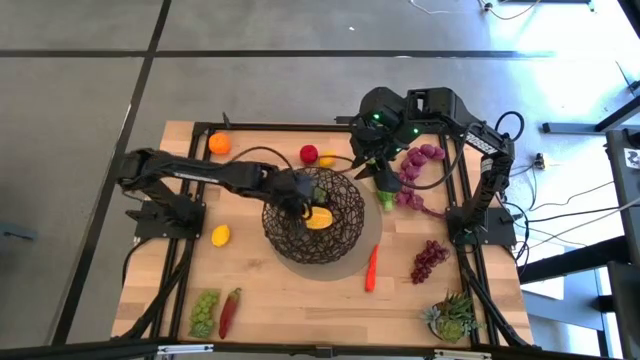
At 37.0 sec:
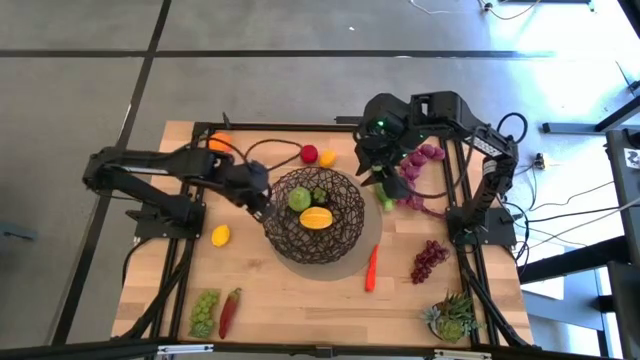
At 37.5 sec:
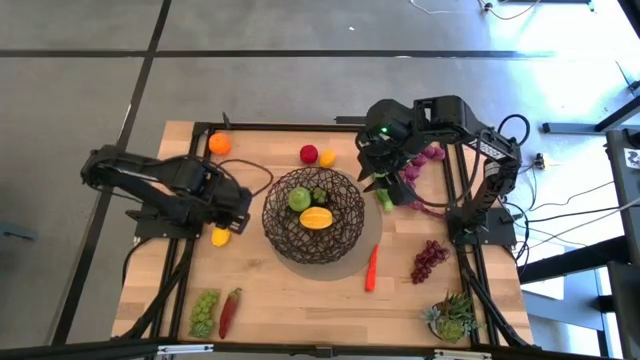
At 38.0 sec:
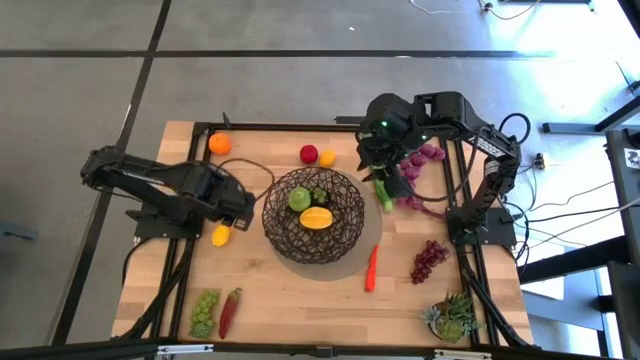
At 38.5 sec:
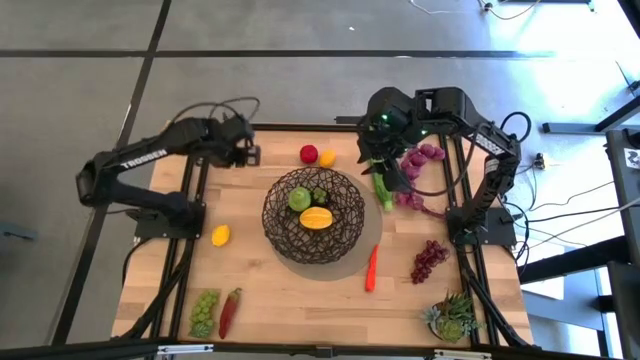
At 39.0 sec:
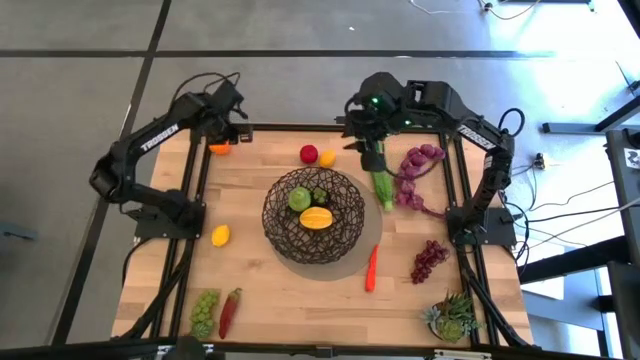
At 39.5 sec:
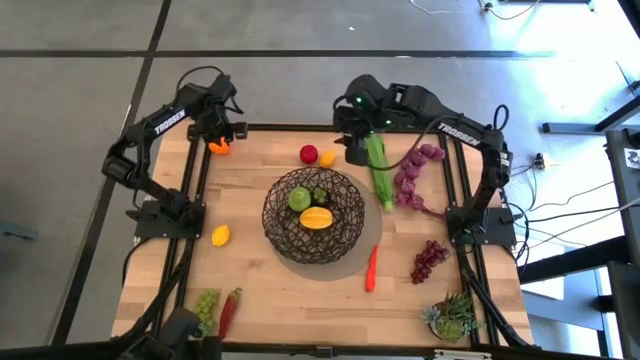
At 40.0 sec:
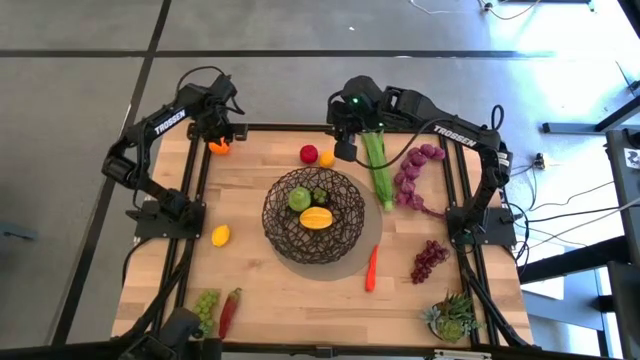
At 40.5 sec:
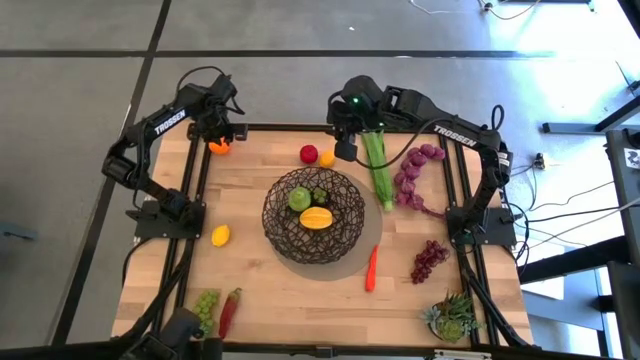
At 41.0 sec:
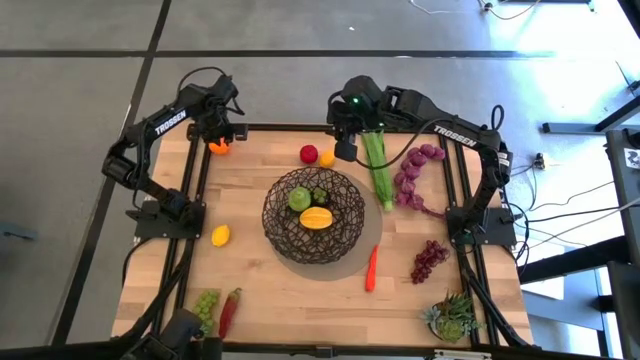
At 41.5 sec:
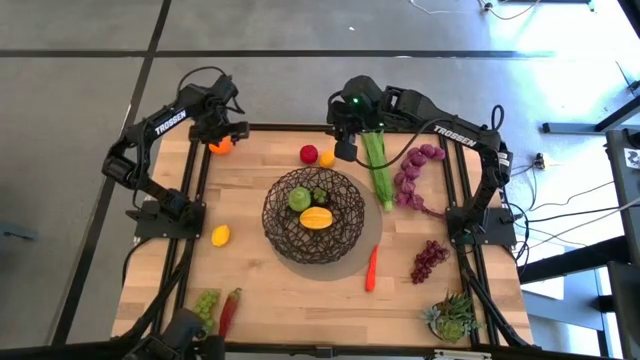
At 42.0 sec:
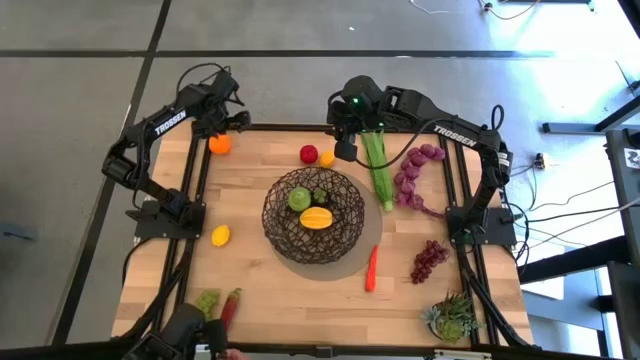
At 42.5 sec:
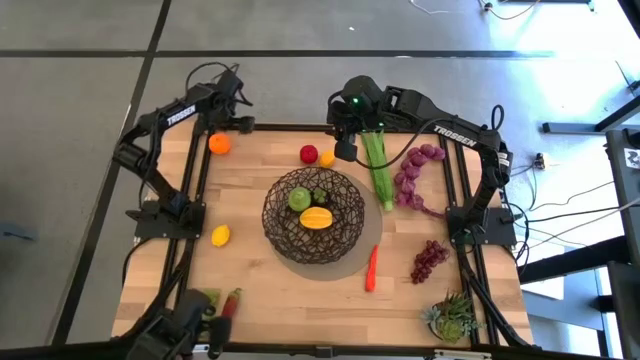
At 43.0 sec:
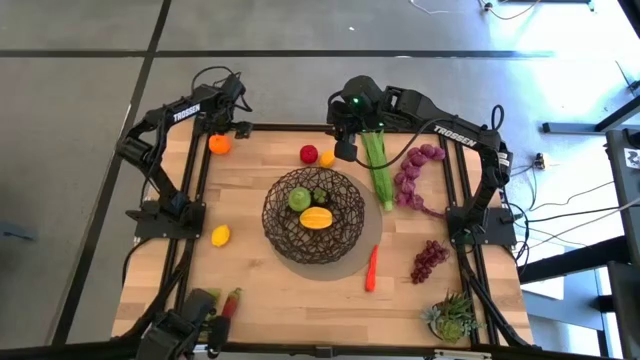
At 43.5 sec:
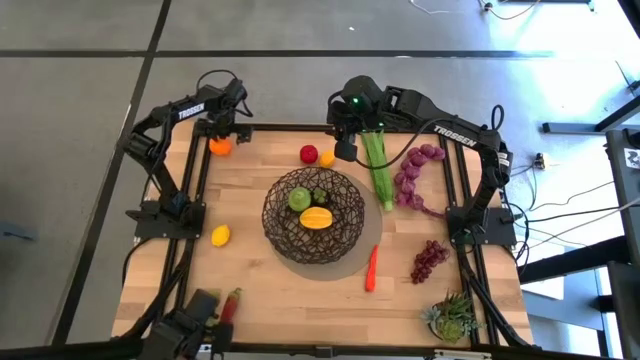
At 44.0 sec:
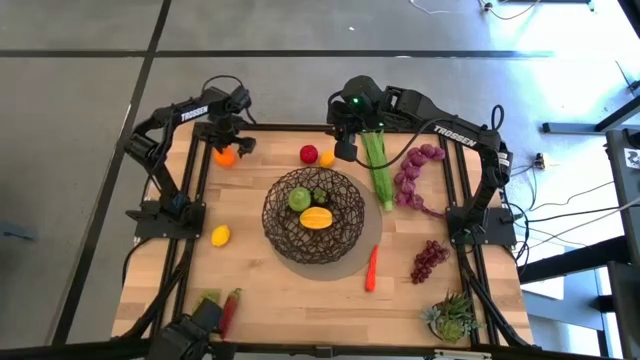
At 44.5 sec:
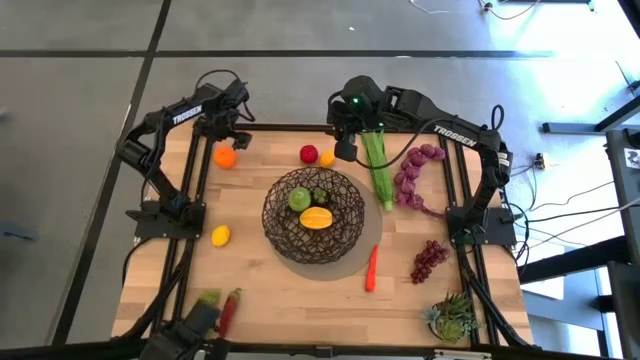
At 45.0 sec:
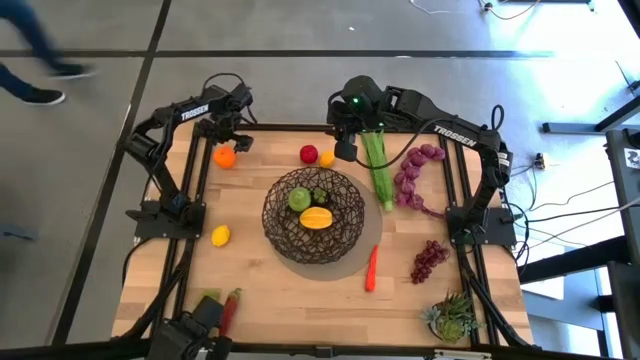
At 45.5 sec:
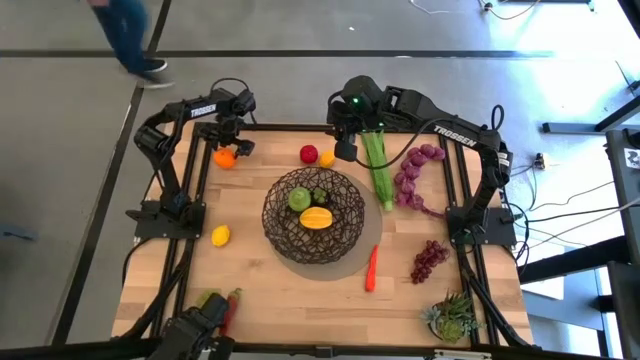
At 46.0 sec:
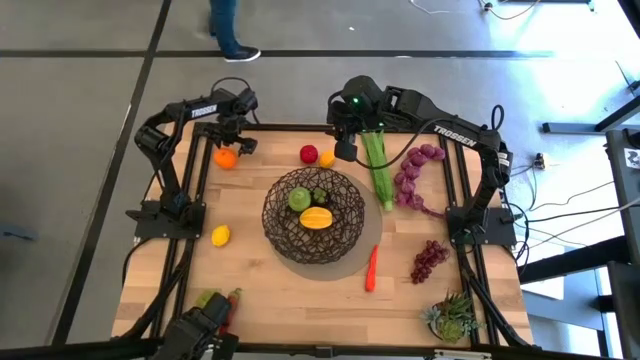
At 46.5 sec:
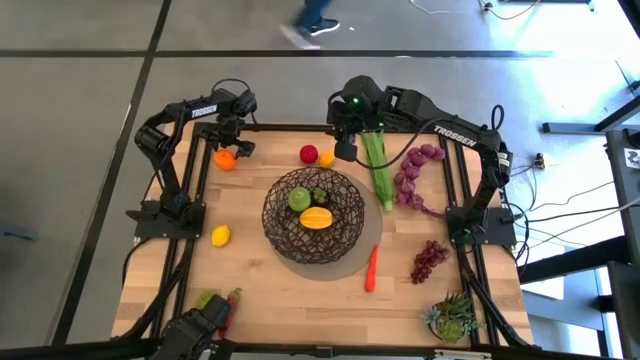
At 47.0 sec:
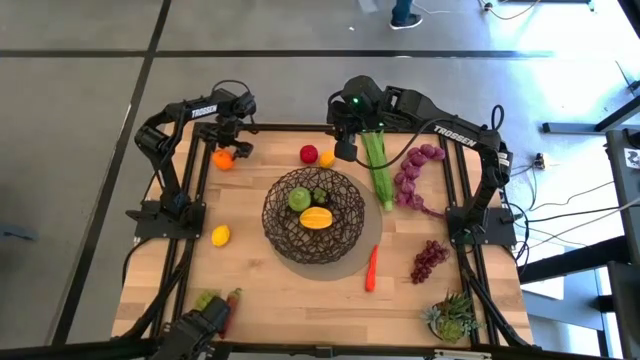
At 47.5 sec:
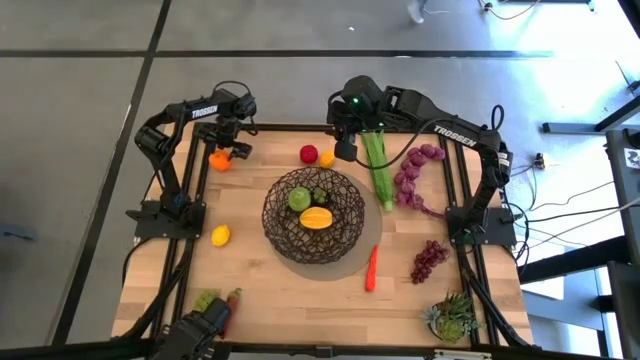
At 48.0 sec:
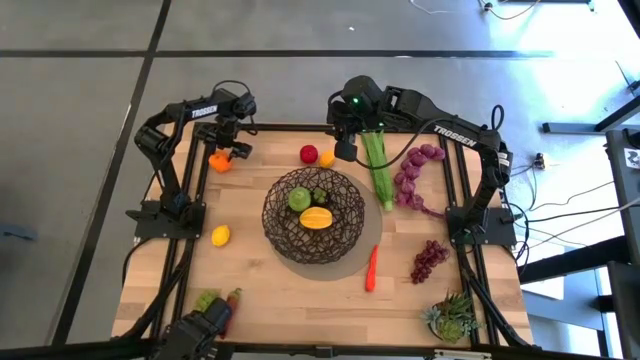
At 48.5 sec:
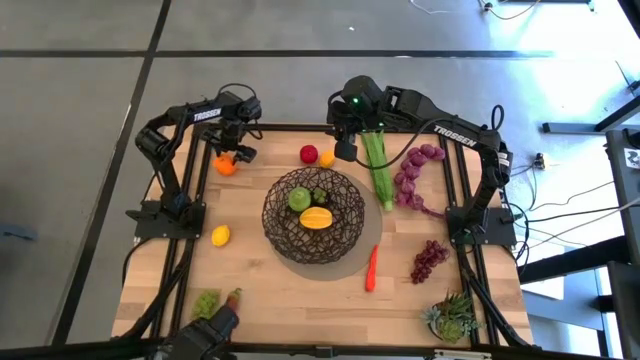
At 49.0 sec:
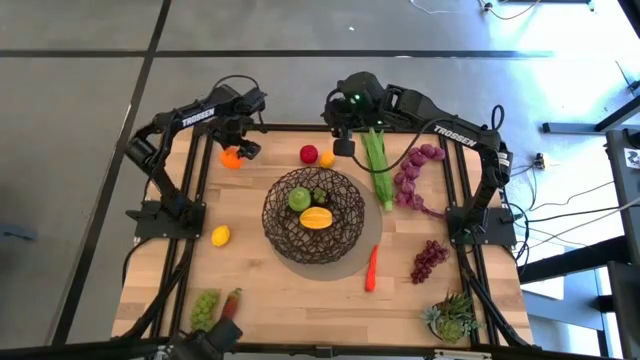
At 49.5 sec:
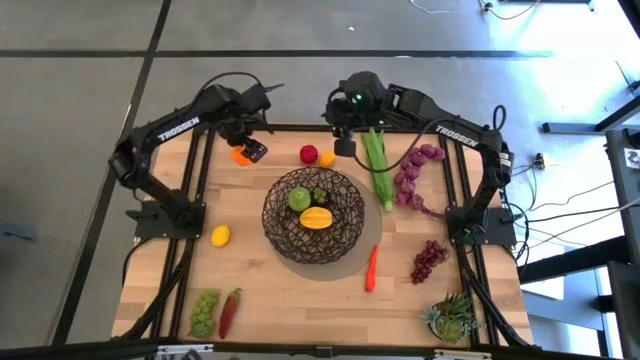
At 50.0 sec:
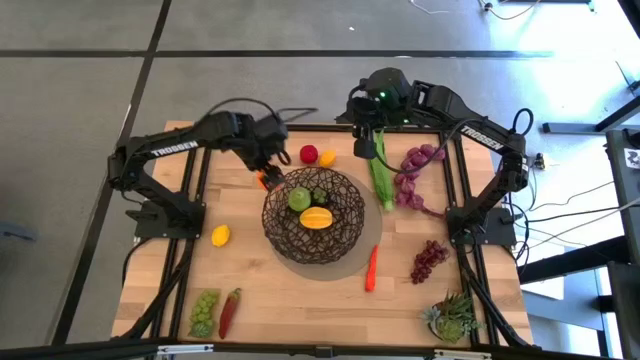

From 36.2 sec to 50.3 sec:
Task: Build produce basket
Put the orange into the wire basket

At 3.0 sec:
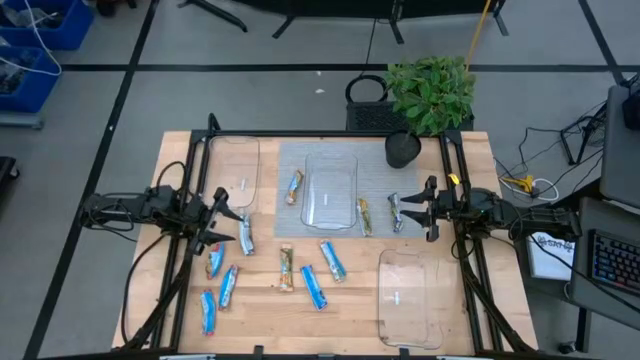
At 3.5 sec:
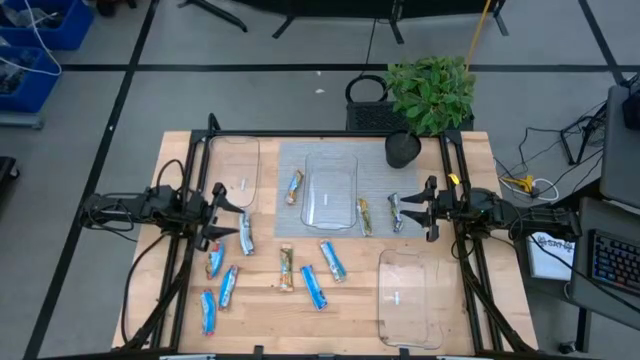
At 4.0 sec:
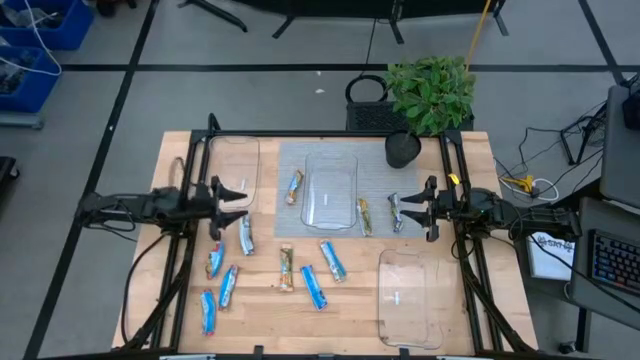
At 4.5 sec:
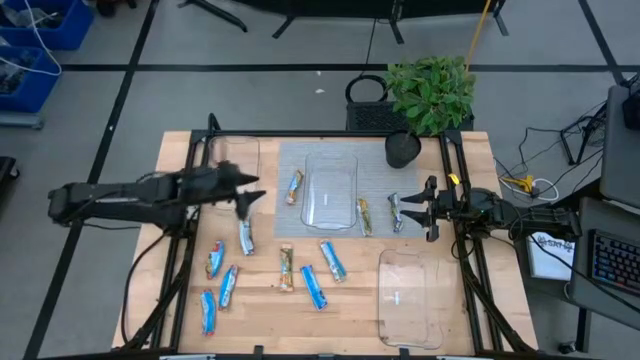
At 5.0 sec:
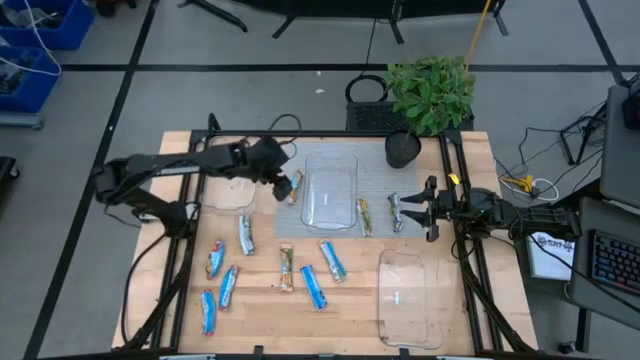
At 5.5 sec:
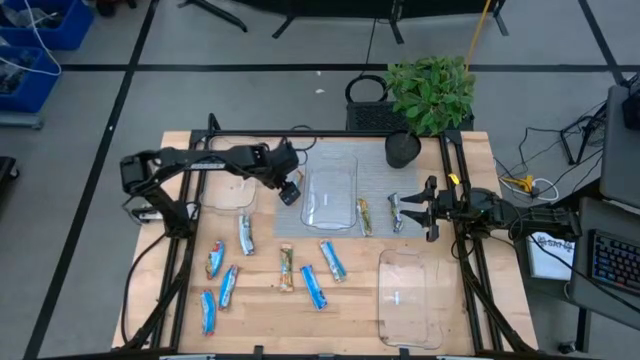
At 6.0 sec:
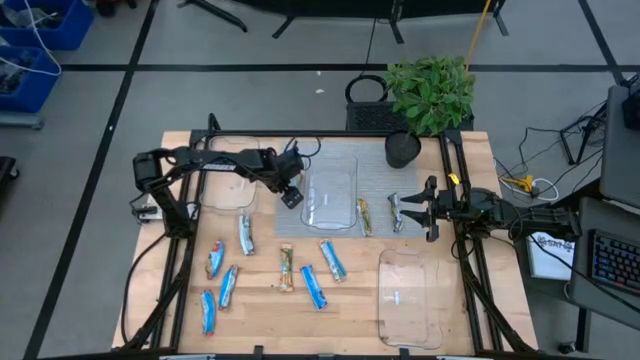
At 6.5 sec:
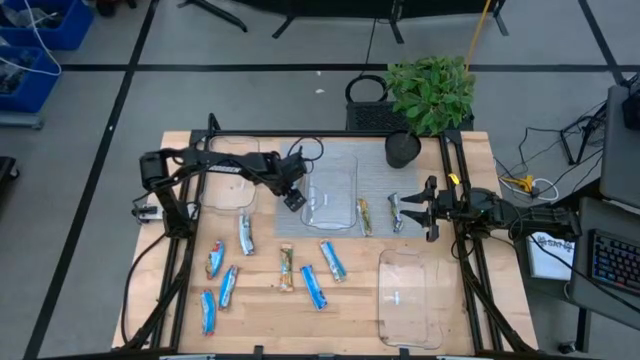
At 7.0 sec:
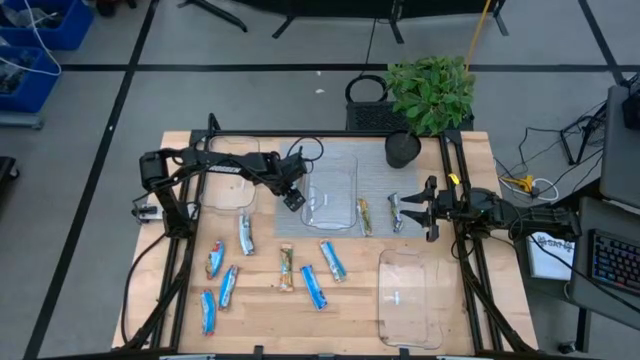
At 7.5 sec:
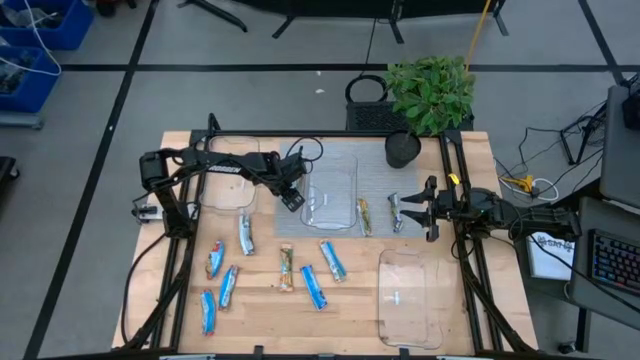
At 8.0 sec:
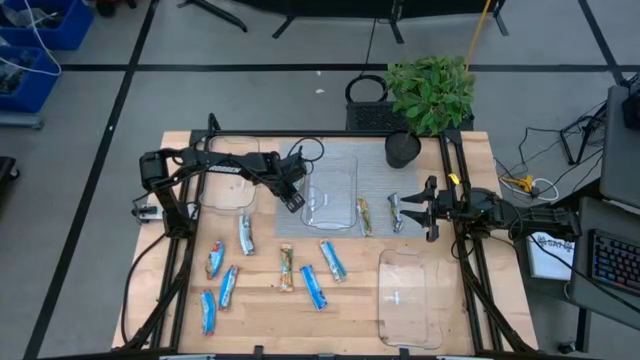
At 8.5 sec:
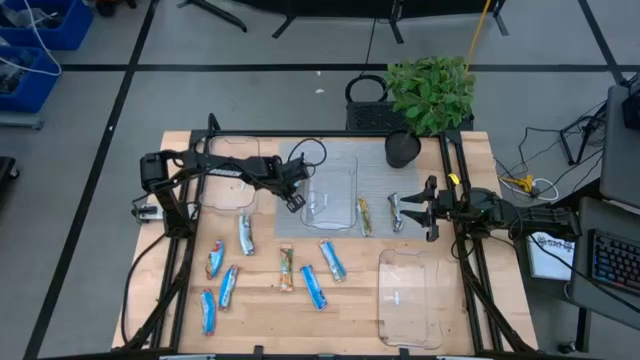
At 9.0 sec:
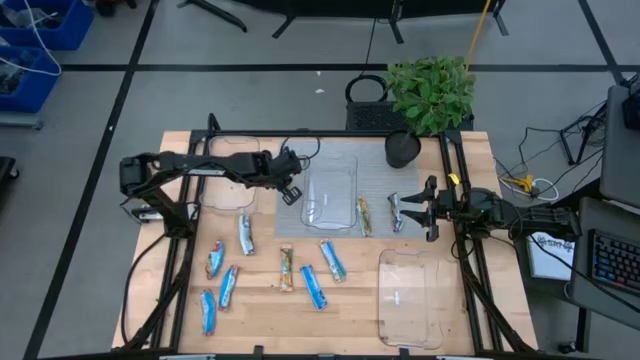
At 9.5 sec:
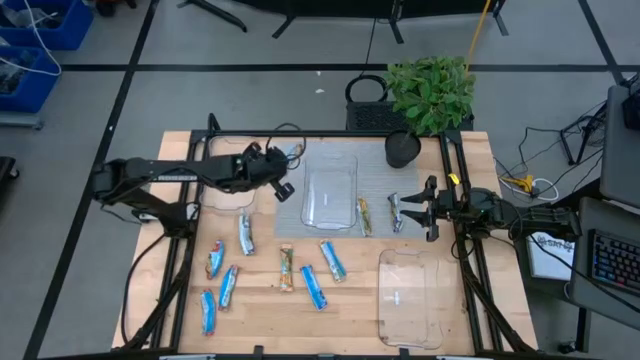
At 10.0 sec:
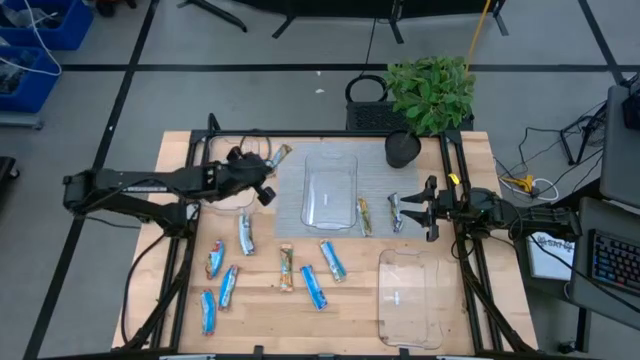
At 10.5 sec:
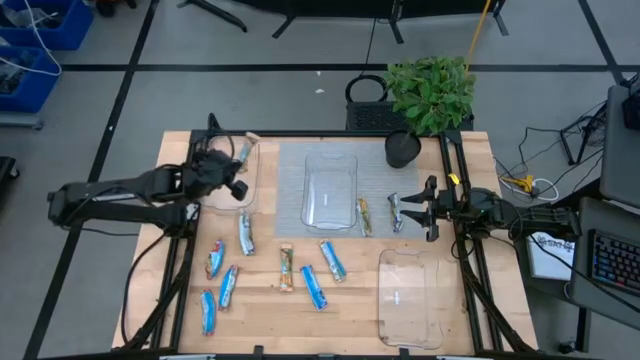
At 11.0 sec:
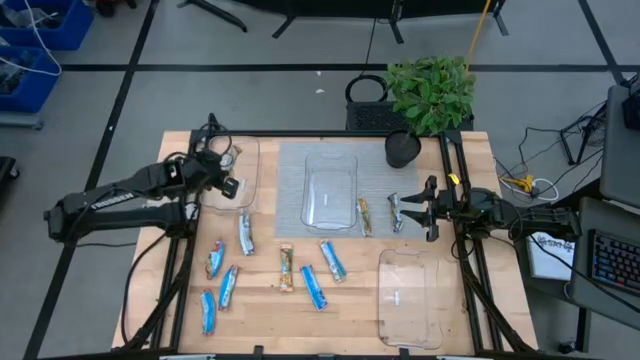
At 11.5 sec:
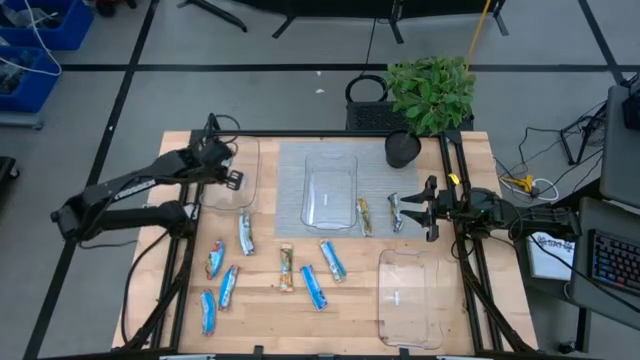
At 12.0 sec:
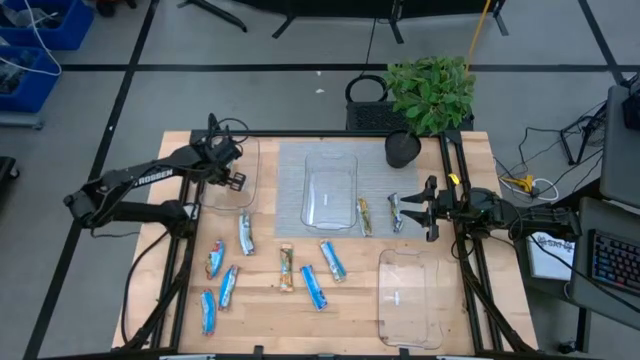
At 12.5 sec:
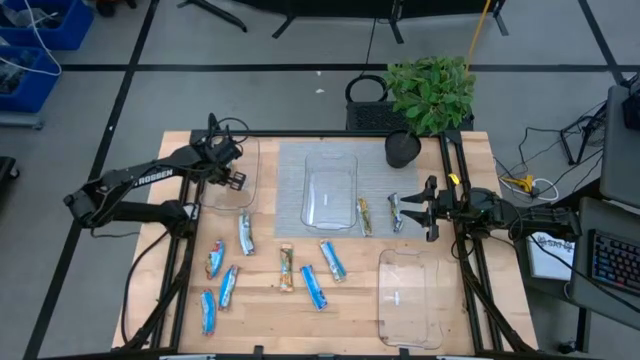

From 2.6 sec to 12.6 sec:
Task: Pick and place Granola Bars by type
Put the yellow granola bar into the top left transparent bin
